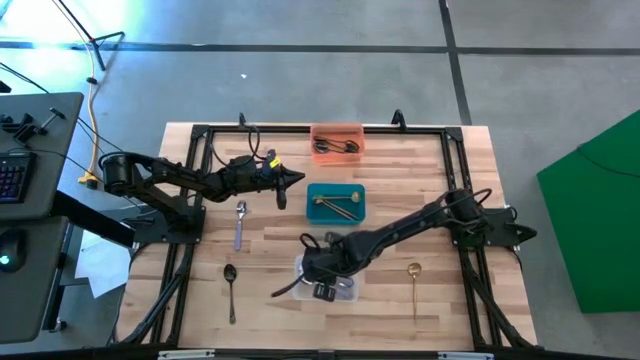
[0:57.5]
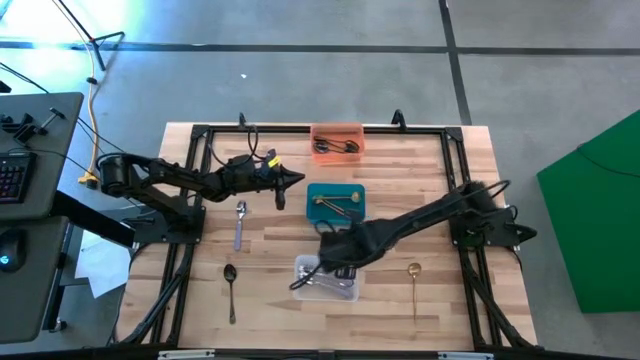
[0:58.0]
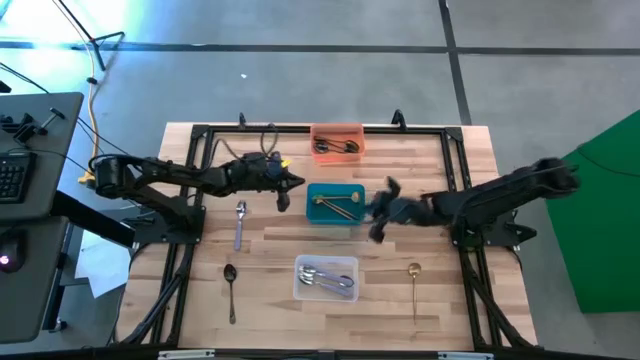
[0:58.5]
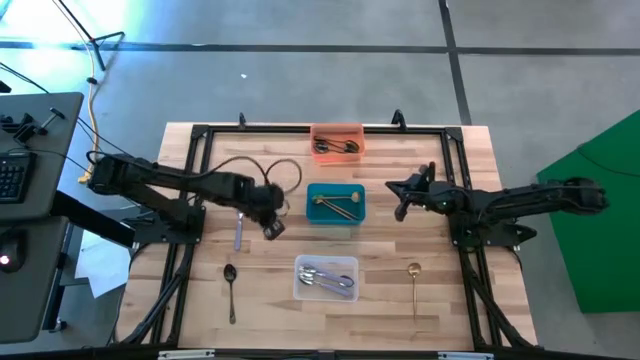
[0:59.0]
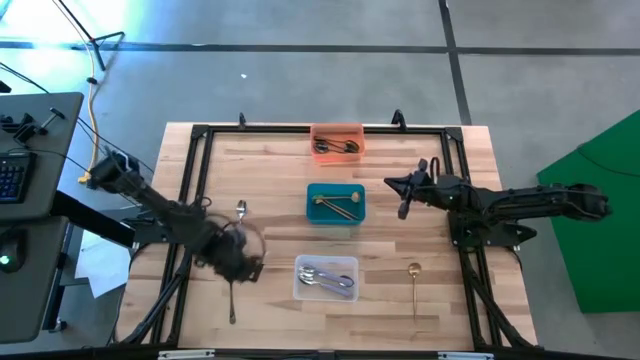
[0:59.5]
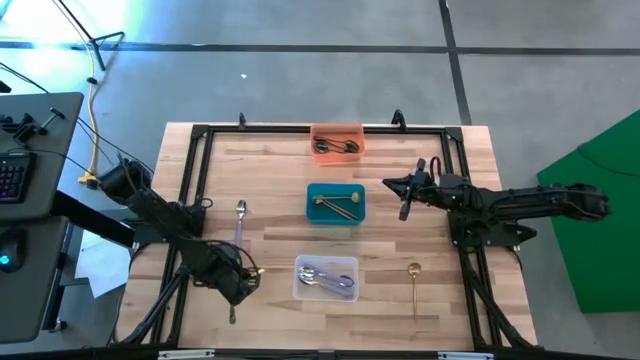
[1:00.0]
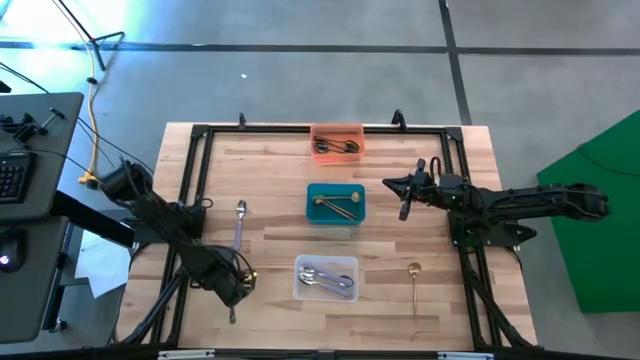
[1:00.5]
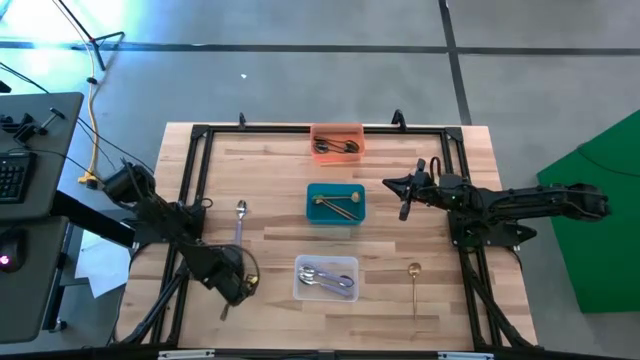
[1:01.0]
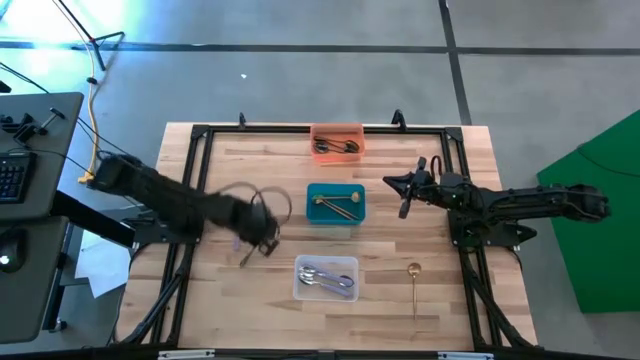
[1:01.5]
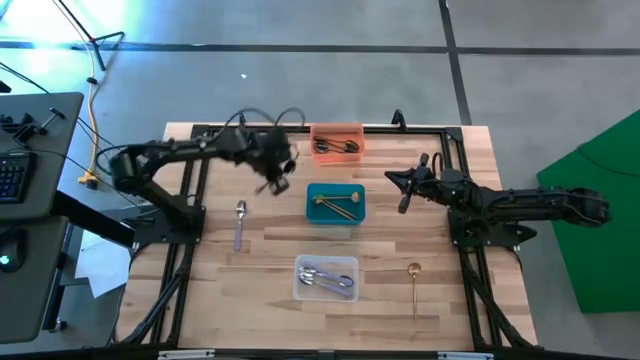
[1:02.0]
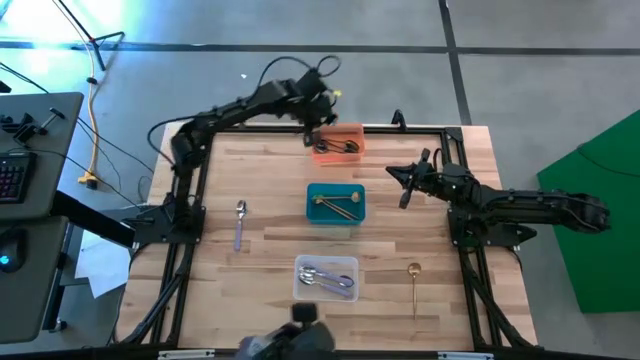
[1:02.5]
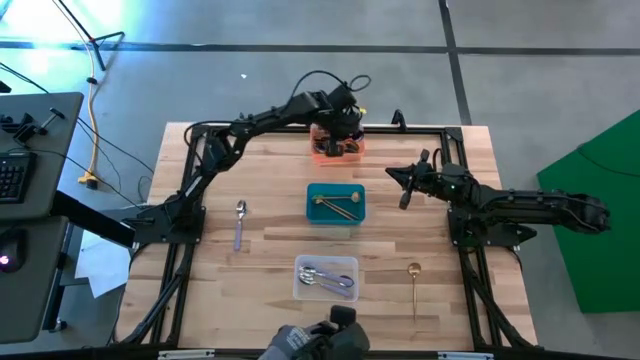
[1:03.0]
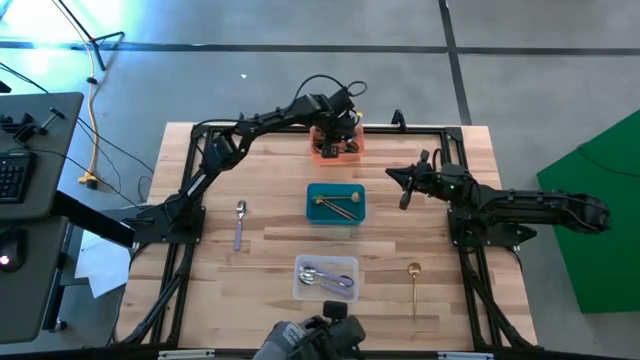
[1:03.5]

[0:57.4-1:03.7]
Task: Sort silverware by color (type)
Put the black spoon into the orange bin

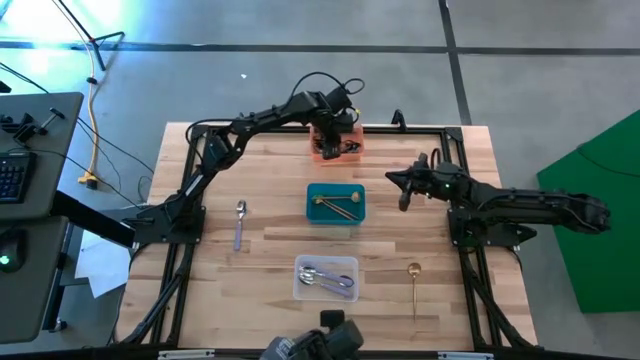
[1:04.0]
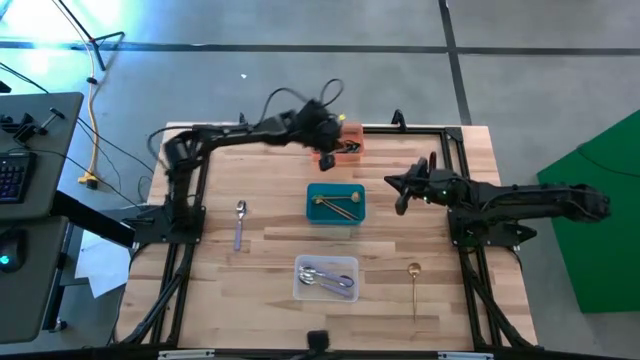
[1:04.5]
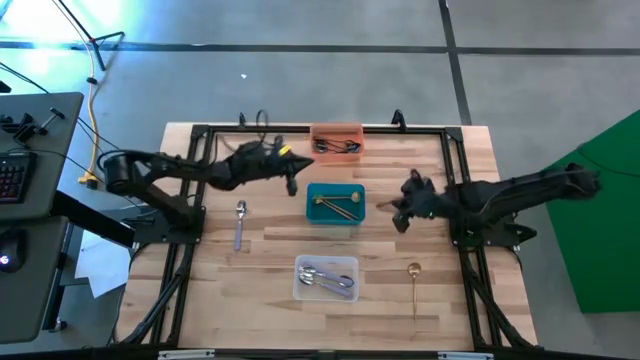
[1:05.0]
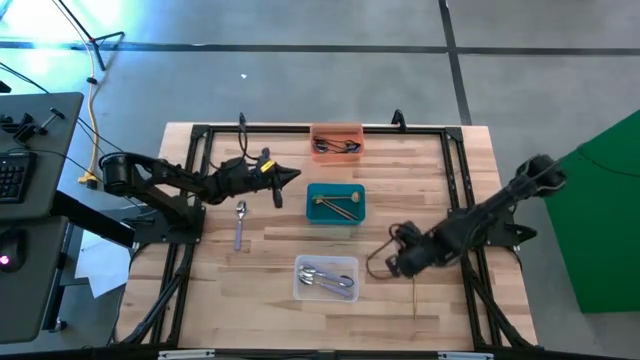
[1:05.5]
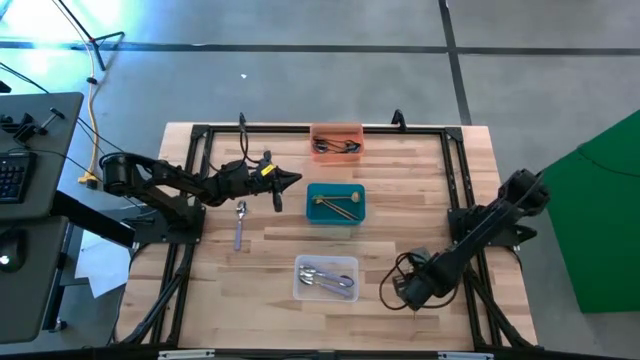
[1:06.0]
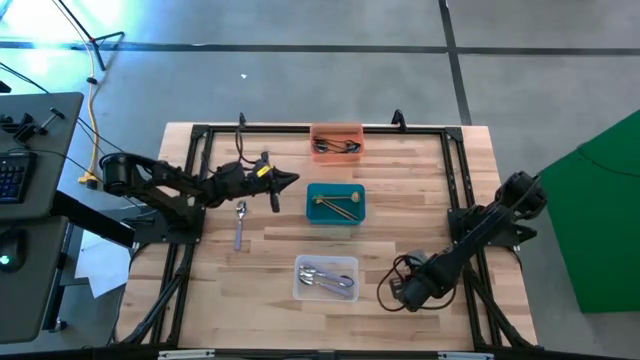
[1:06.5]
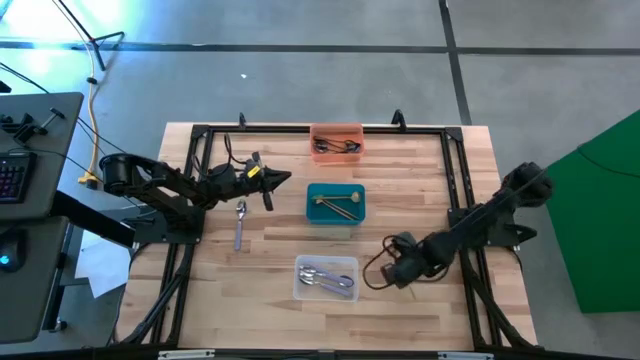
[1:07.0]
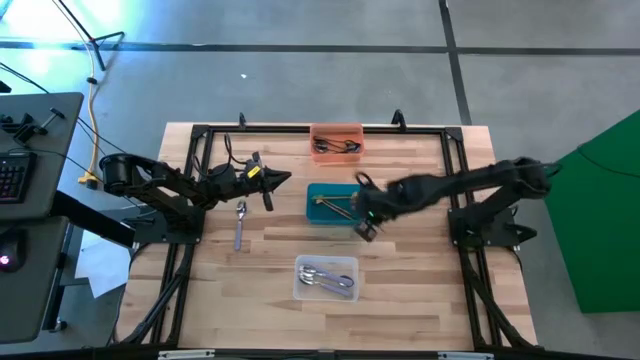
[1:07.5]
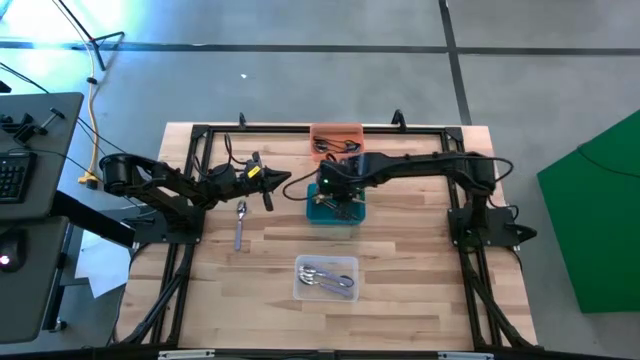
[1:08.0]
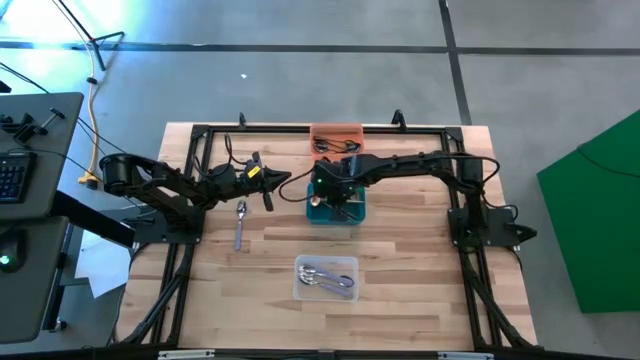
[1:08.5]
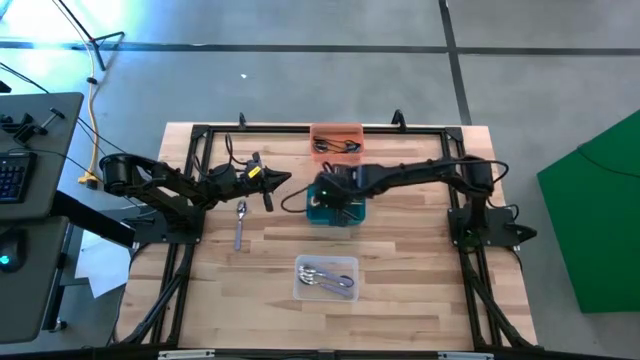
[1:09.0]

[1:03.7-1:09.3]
Put the gold spoon into the dark green bin

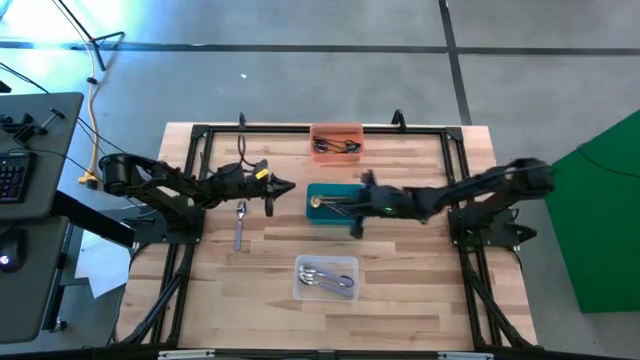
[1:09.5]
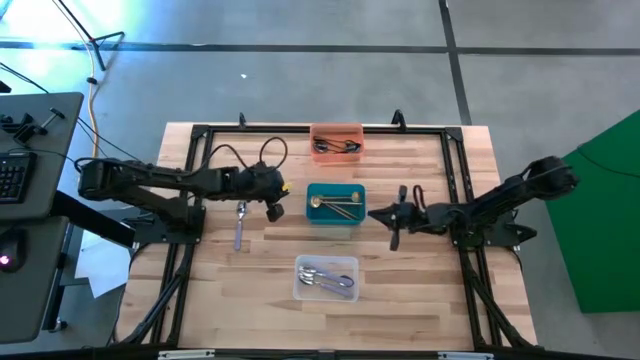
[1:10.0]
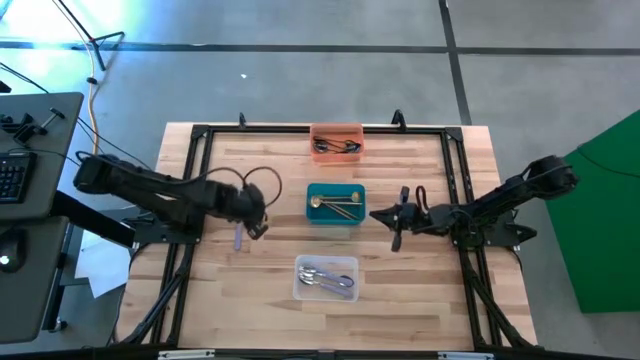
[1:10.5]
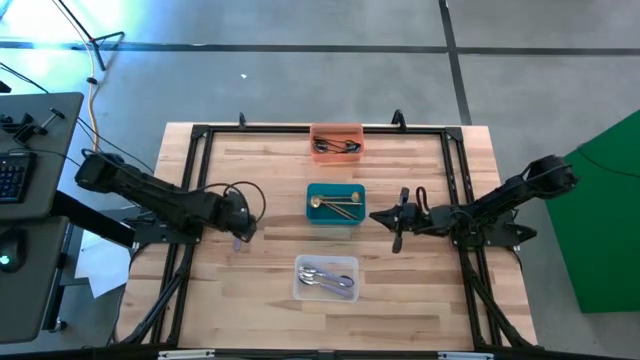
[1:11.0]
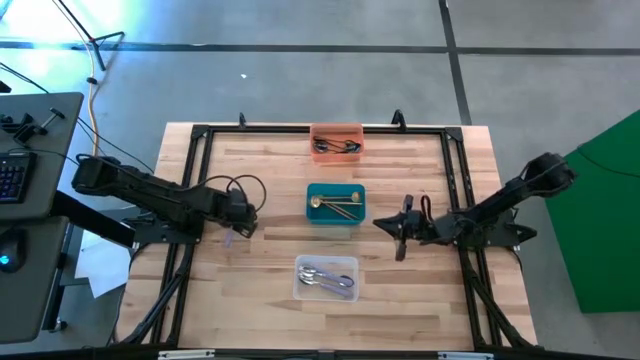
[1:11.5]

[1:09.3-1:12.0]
Put the purple spoon into the transparent bin

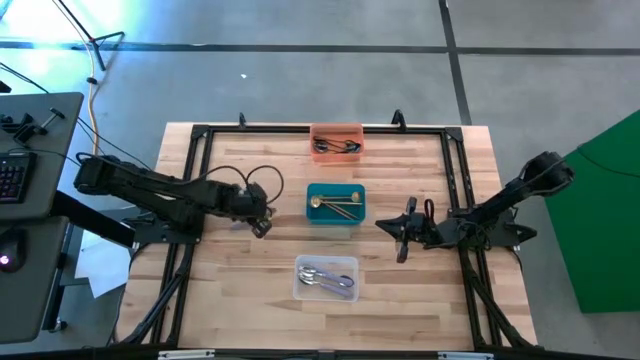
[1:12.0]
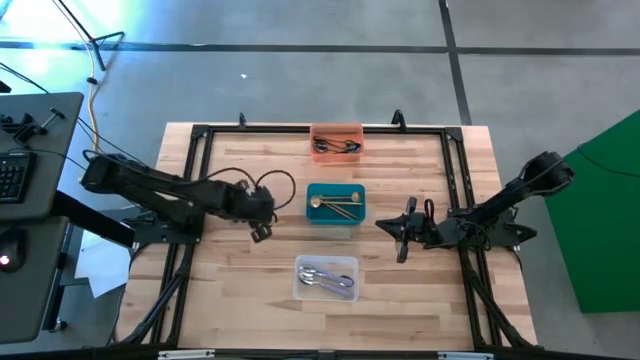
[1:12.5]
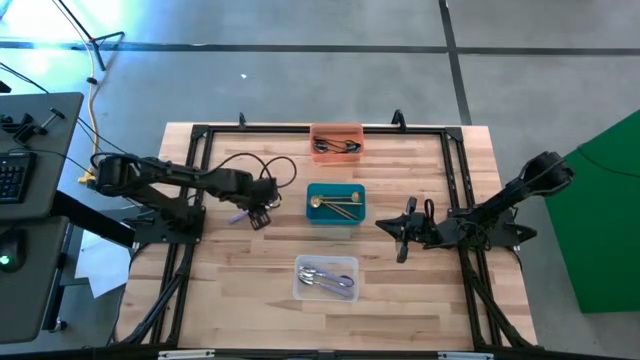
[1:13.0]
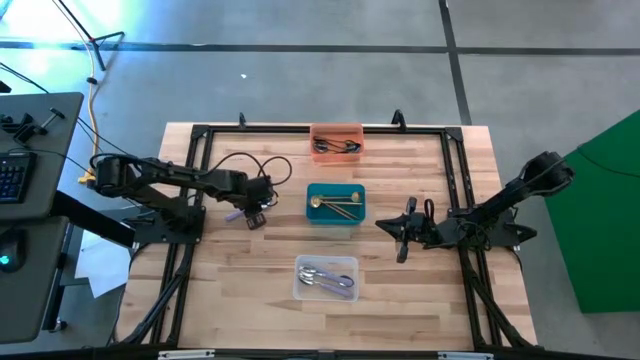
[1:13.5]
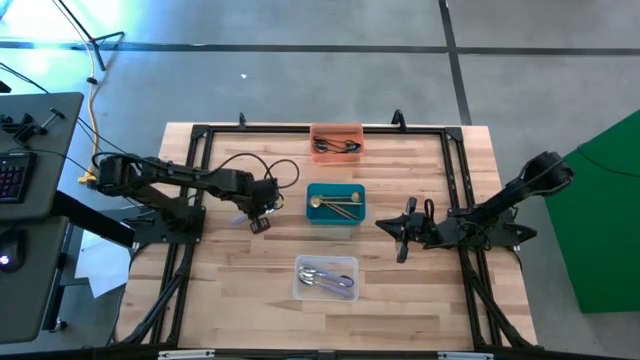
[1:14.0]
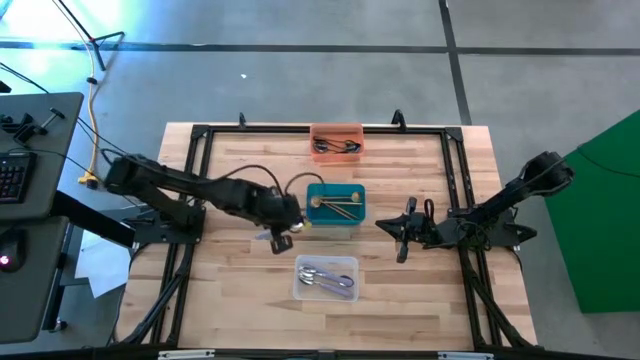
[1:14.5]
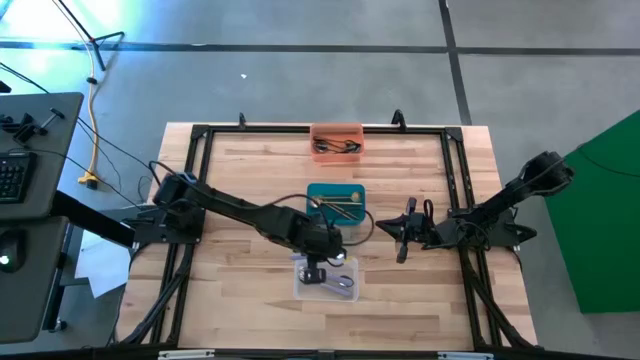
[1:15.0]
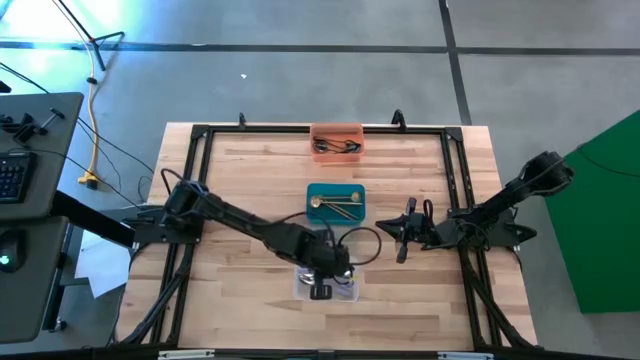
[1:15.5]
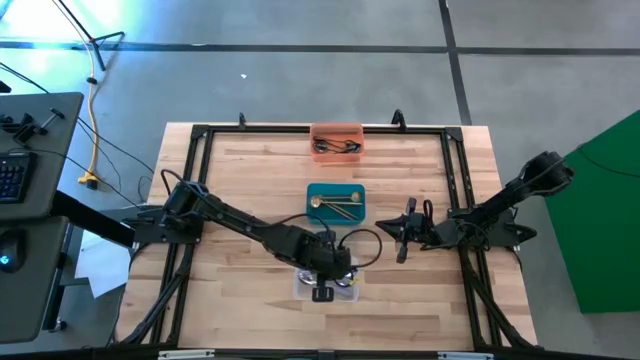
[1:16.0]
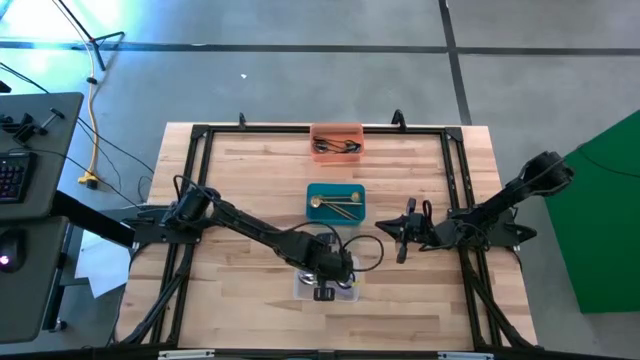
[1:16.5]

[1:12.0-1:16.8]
Put the purple spoon into the transparent bin
